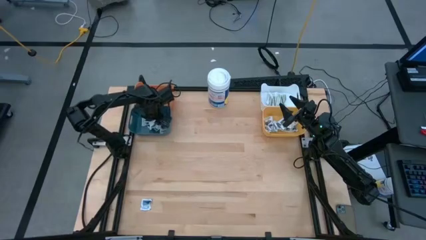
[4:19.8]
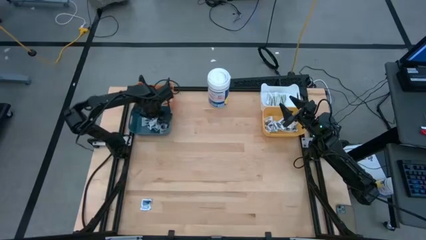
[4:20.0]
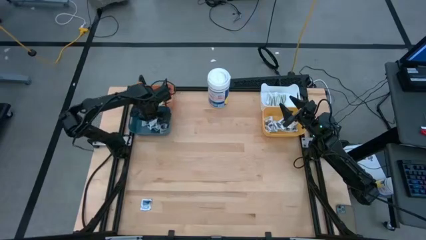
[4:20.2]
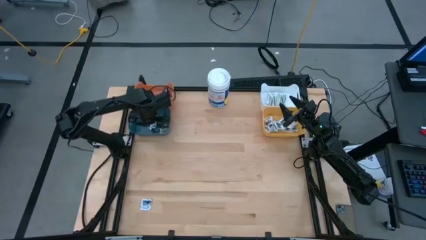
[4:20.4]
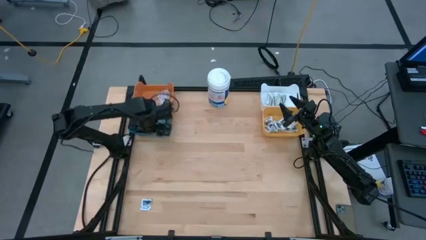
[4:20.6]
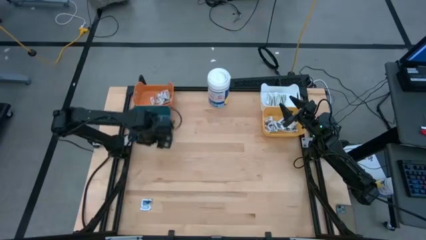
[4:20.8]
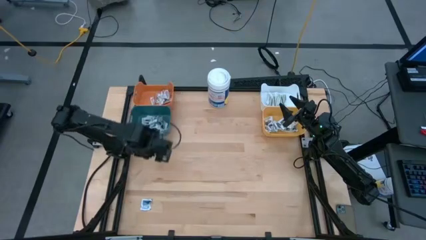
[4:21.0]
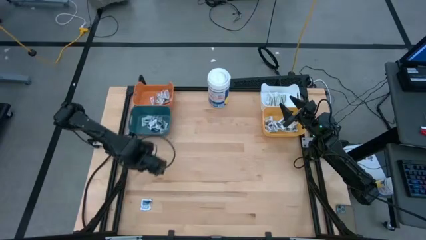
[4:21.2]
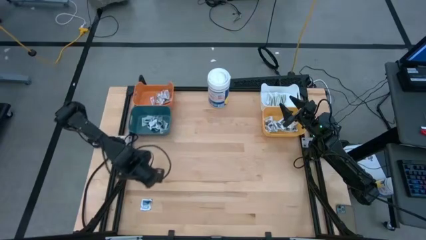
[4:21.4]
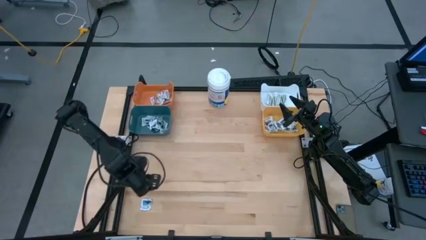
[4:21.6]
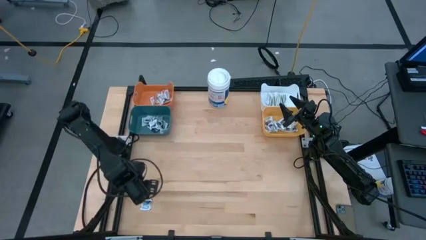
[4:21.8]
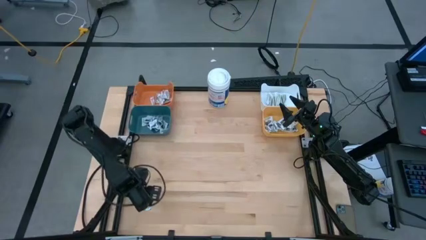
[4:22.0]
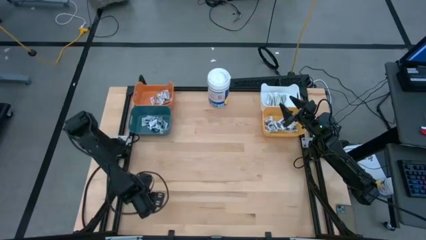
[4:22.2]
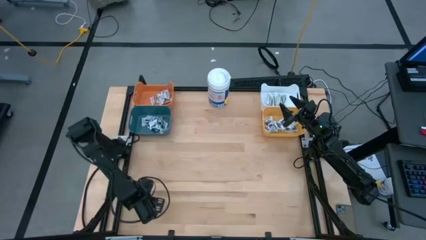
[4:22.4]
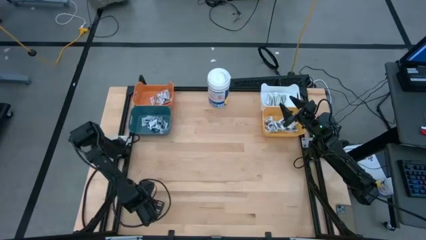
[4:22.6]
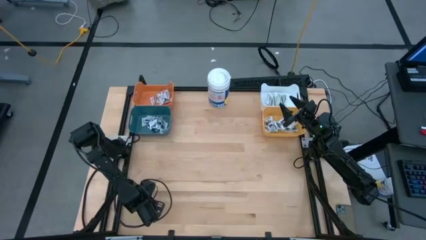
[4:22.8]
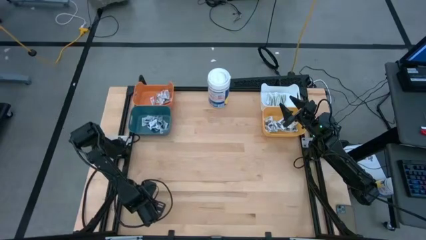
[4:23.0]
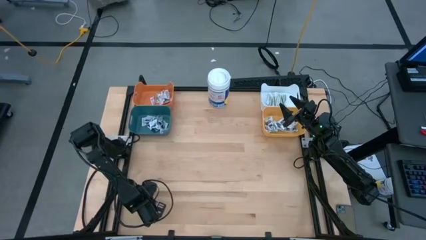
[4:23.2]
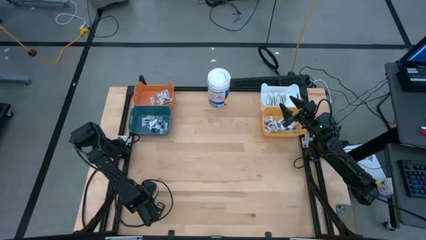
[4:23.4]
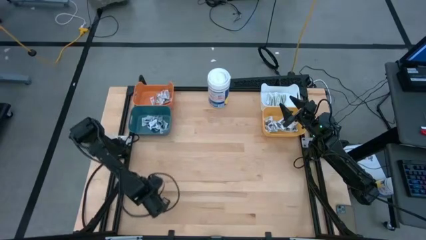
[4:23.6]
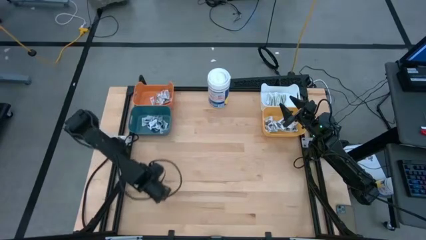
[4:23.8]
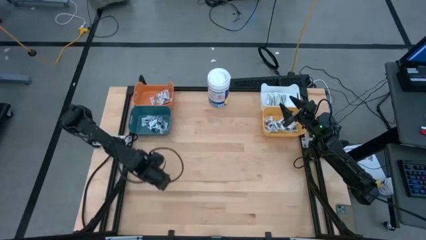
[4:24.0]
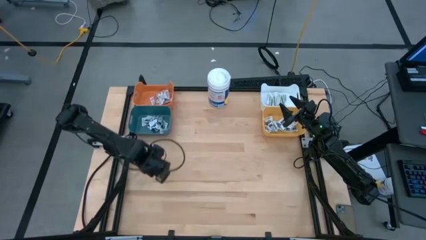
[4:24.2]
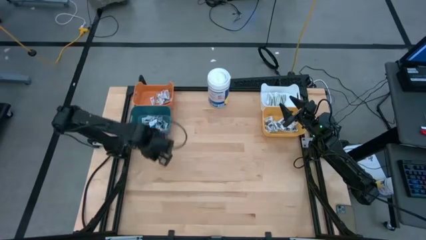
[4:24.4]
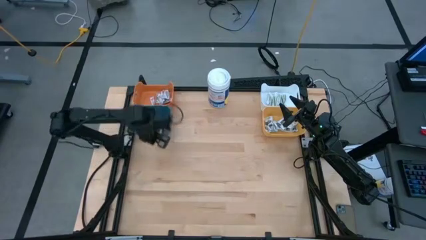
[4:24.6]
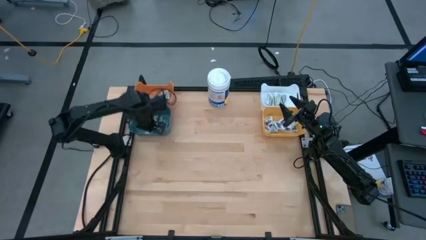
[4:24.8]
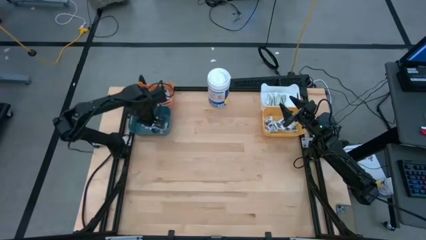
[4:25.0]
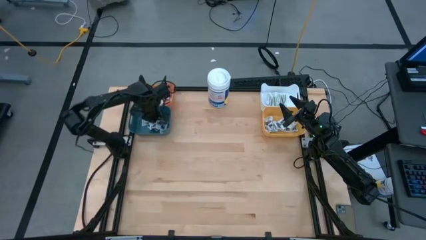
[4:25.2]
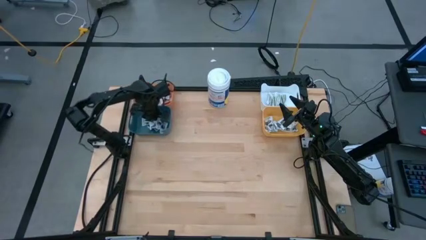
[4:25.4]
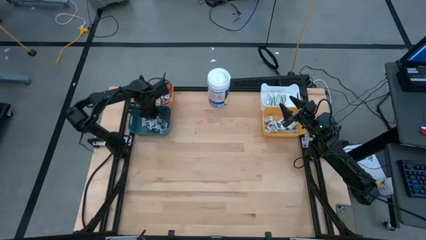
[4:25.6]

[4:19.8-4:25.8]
Task: Pick & Place First Aid Supplies
Put the blue pad into the blue bin

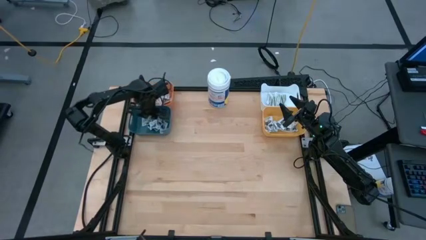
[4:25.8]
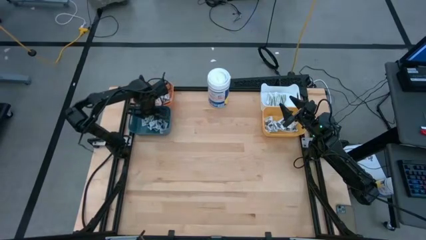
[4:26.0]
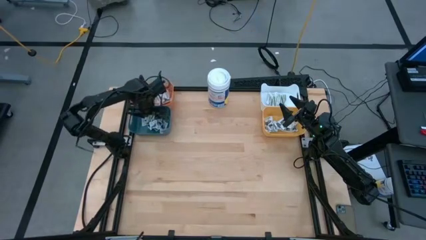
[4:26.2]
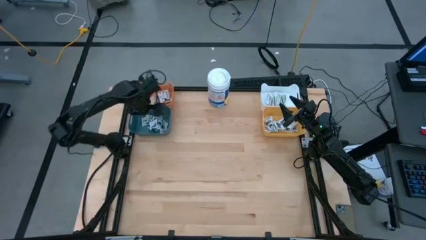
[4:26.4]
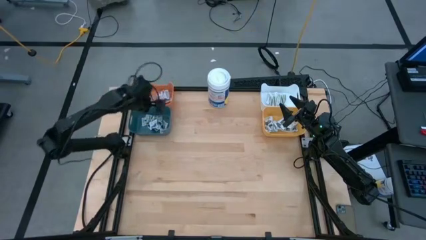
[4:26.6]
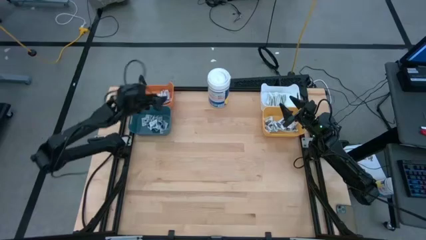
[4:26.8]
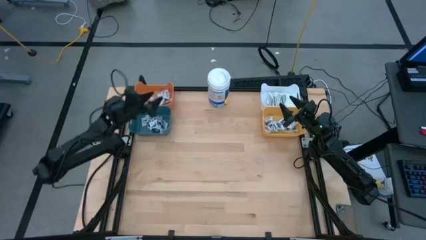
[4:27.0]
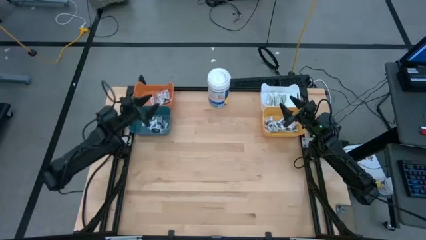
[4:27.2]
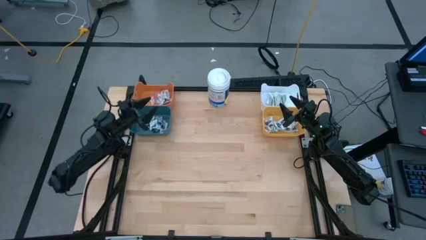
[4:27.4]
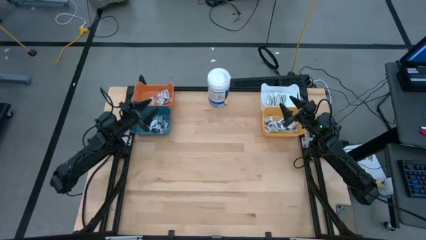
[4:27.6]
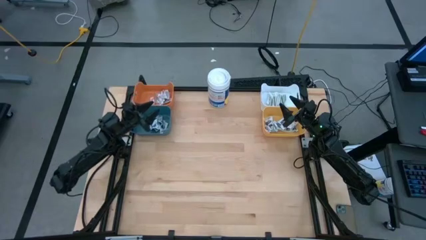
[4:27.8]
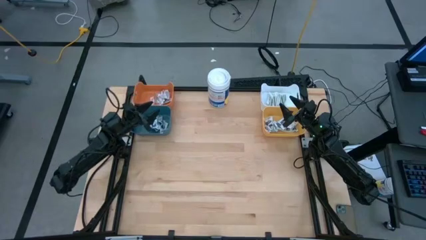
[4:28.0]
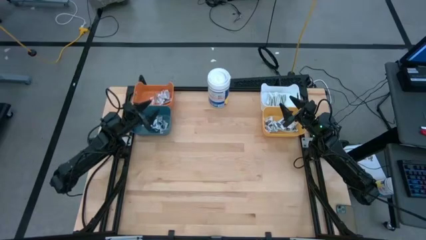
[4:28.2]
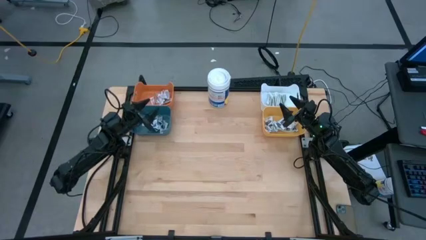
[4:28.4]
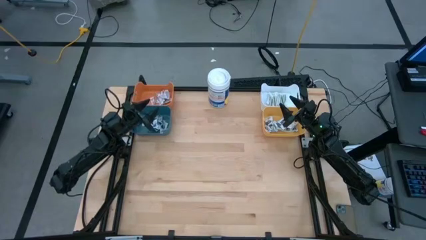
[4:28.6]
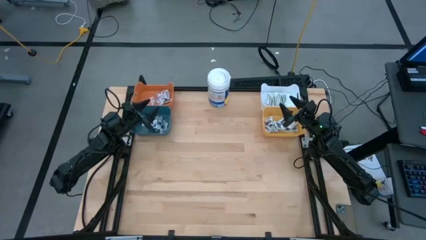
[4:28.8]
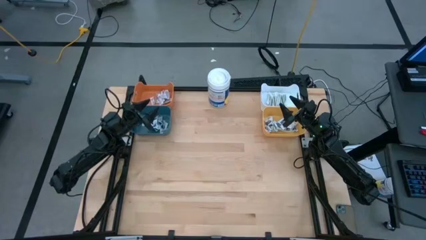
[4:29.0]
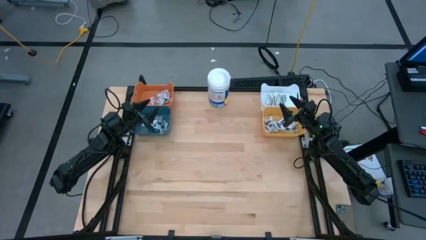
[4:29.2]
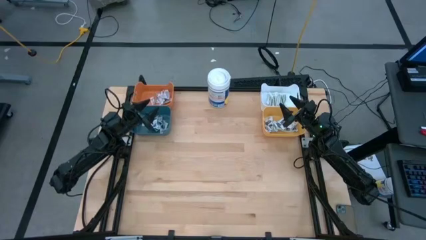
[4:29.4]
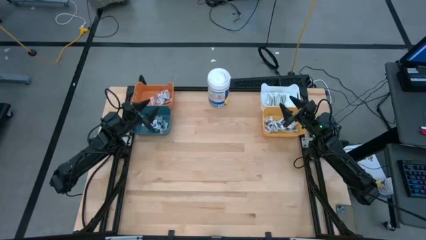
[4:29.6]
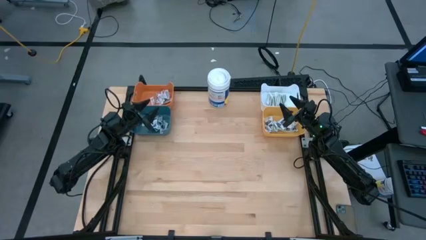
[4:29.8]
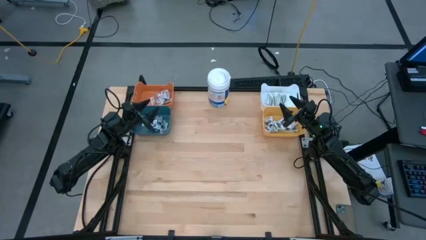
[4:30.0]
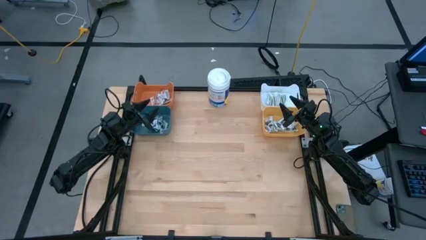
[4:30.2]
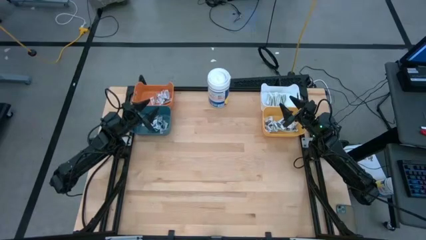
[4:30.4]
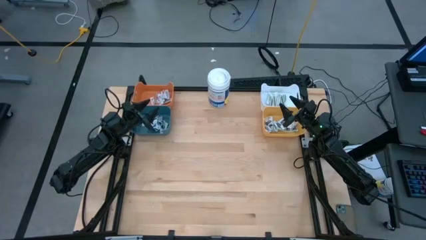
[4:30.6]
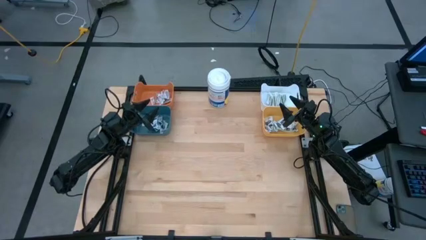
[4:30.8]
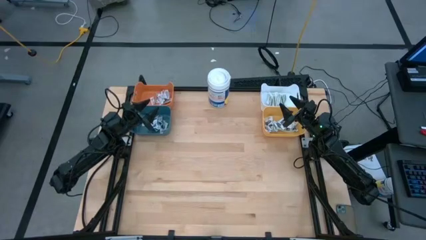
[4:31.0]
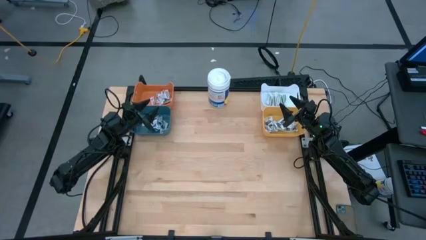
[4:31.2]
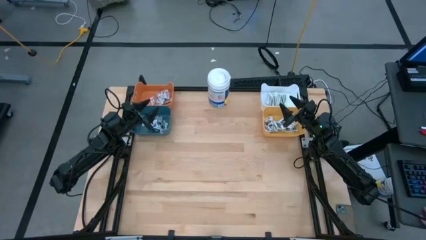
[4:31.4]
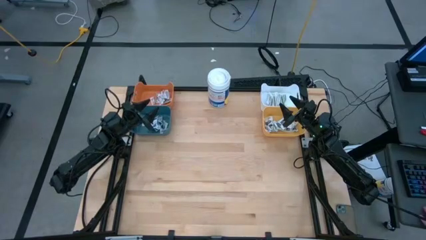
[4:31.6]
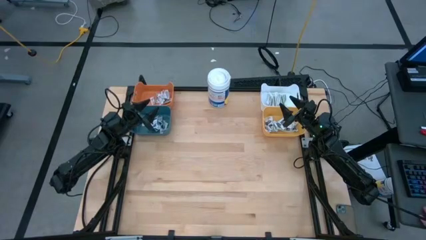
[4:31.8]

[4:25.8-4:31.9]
Return to Home Position

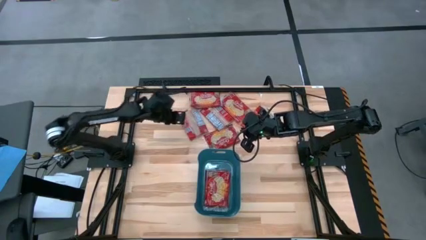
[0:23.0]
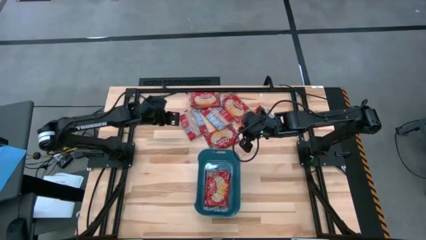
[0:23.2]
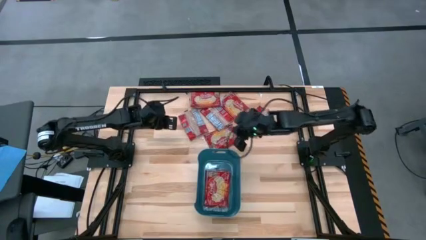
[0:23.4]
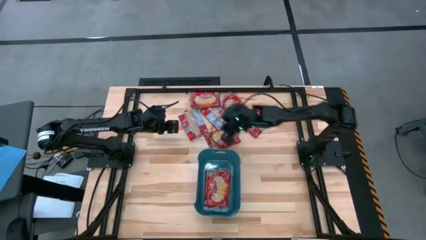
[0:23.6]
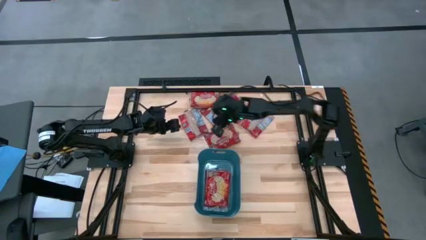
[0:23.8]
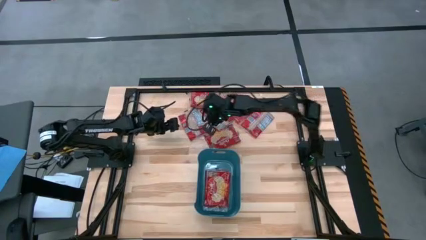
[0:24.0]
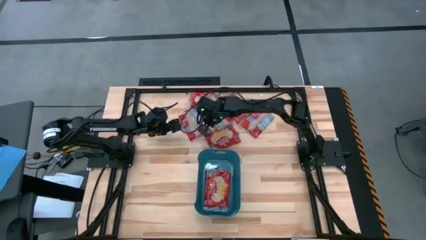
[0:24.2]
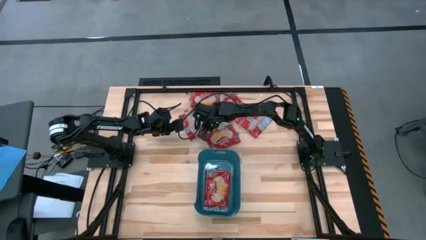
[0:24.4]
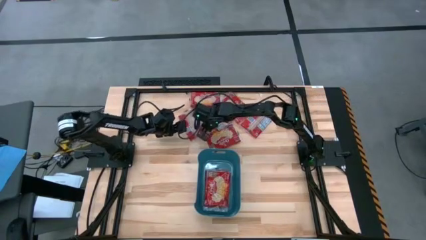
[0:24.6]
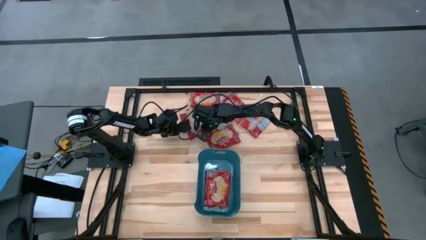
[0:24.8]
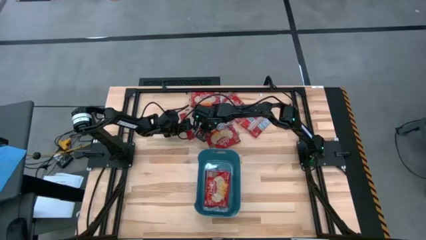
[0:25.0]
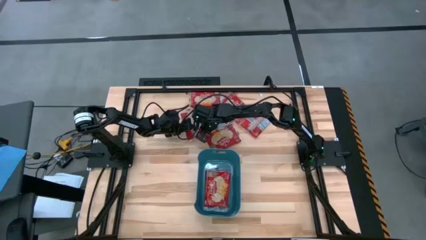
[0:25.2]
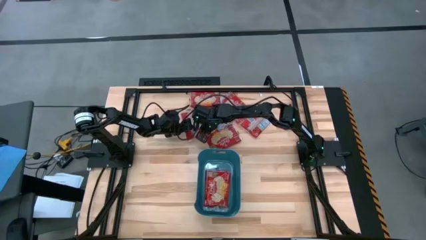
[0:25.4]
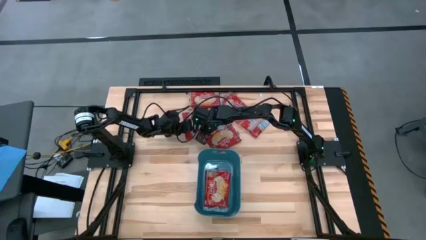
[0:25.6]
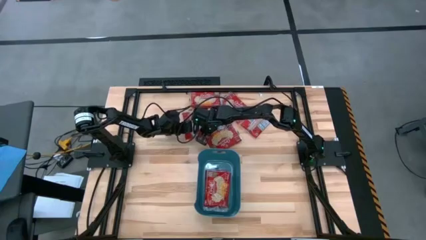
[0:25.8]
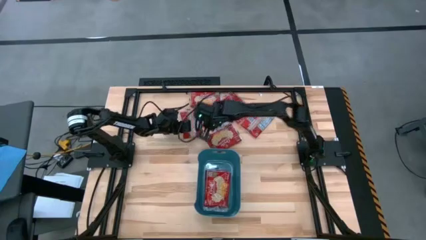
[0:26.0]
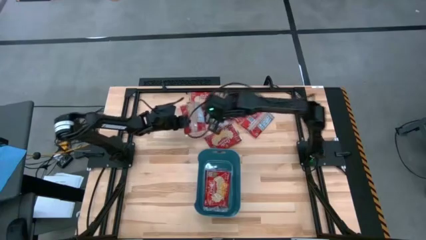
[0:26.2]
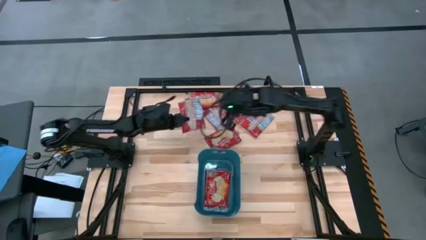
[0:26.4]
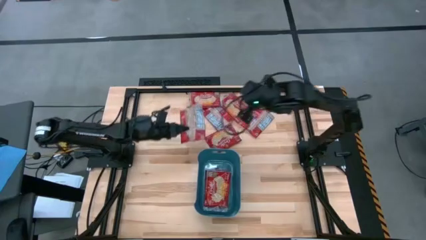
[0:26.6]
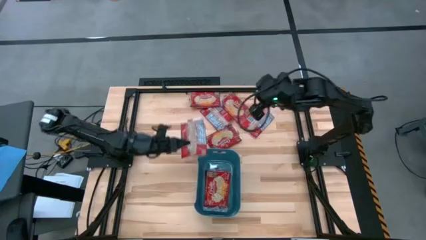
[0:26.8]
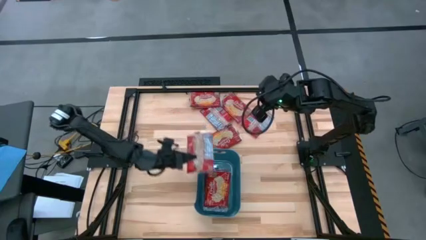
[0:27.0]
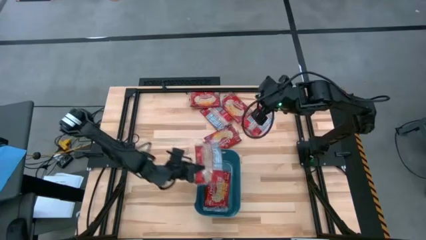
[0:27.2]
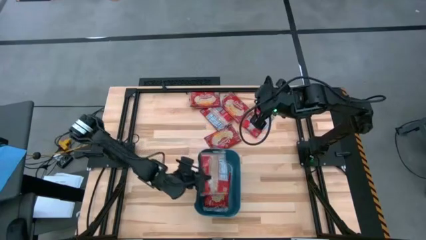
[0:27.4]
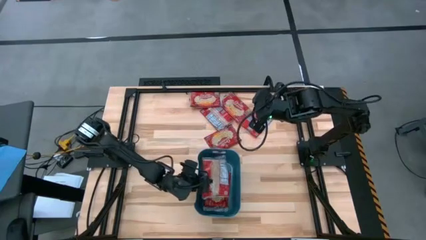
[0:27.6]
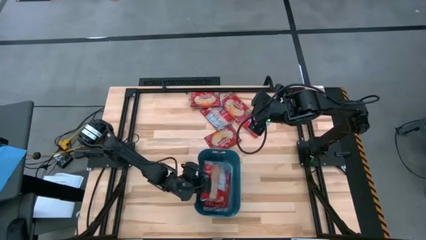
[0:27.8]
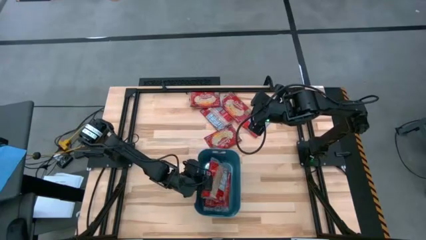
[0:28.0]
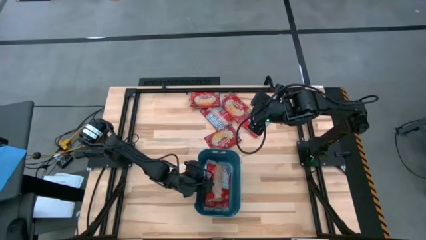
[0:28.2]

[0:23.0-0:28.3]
Task: Sort popcorn bags into baskets
Put the red popcorn pack into the blue container
